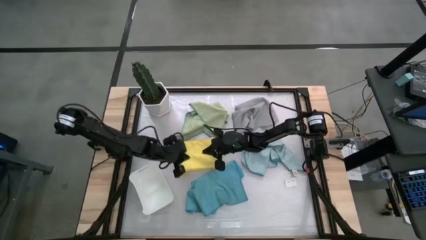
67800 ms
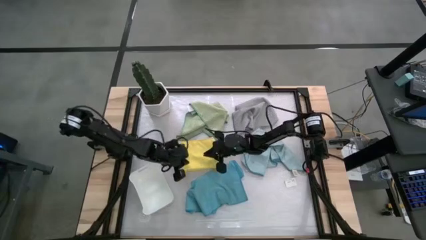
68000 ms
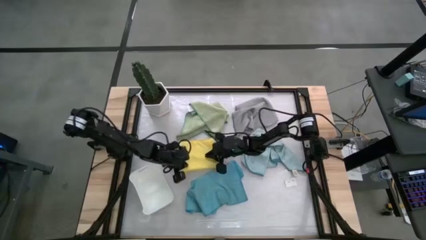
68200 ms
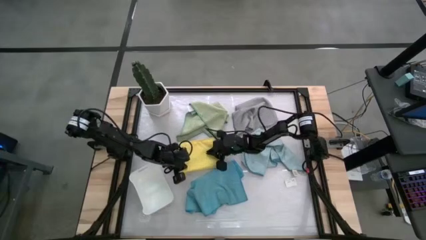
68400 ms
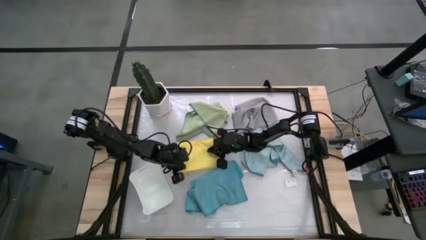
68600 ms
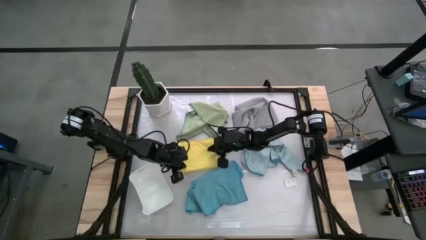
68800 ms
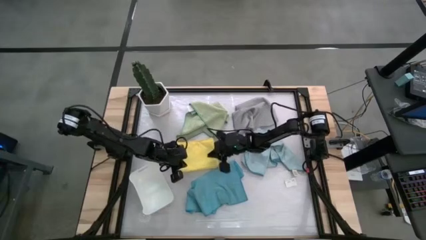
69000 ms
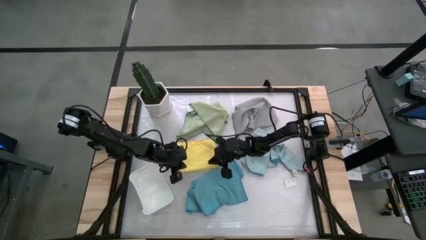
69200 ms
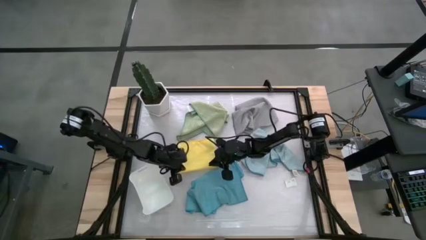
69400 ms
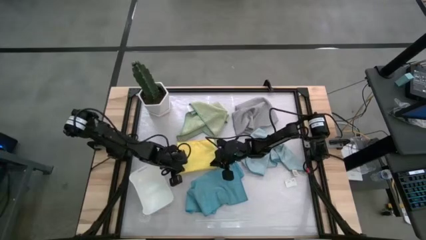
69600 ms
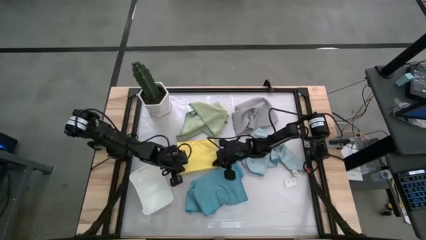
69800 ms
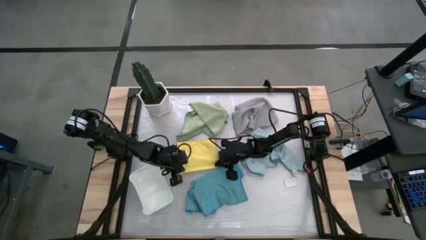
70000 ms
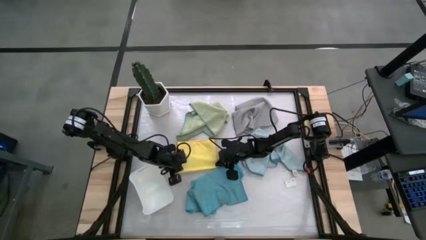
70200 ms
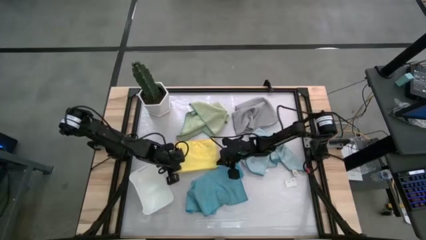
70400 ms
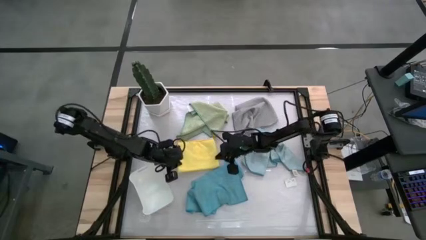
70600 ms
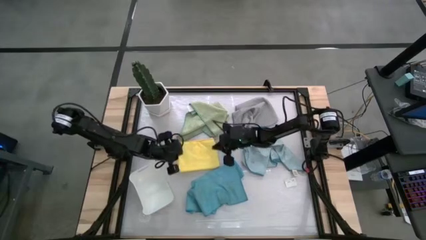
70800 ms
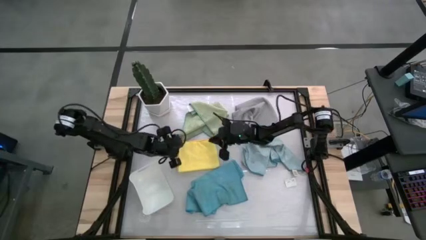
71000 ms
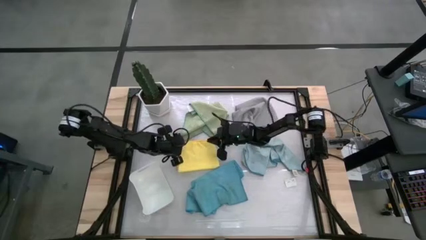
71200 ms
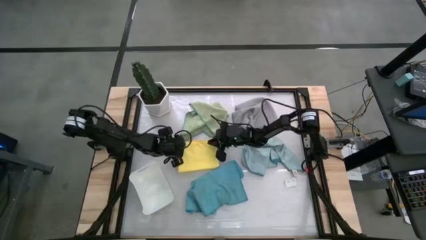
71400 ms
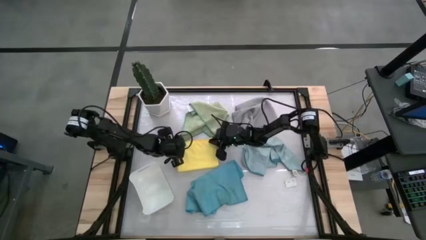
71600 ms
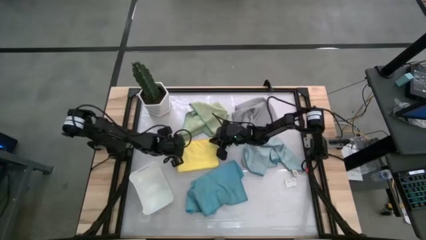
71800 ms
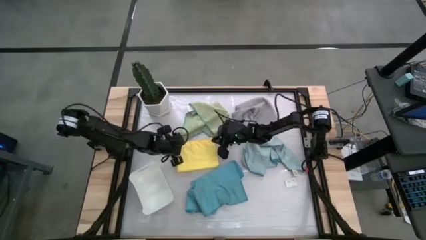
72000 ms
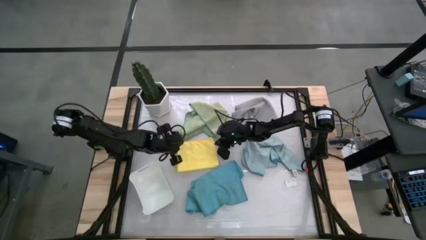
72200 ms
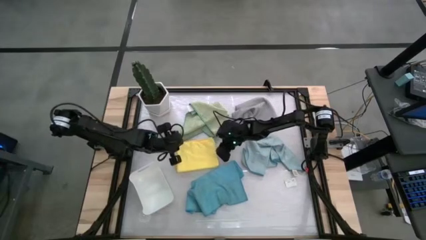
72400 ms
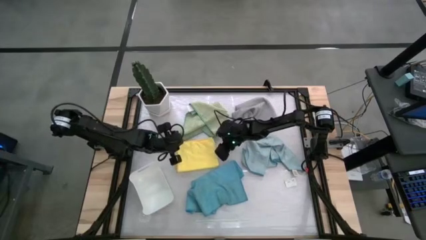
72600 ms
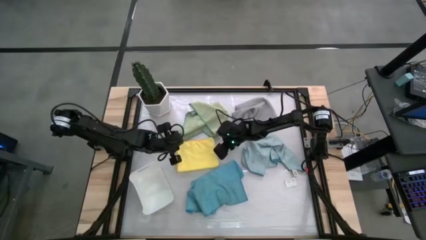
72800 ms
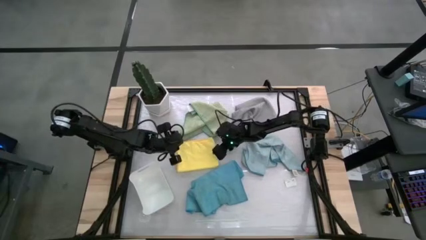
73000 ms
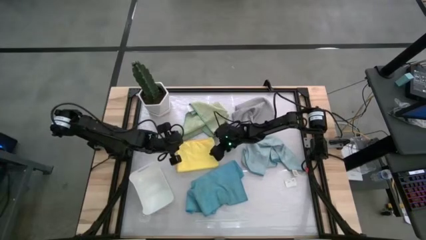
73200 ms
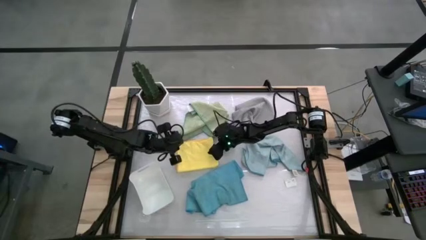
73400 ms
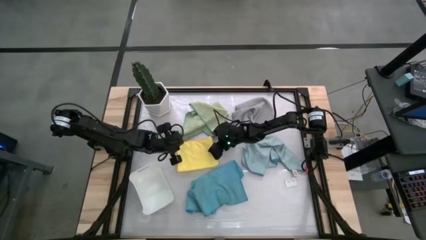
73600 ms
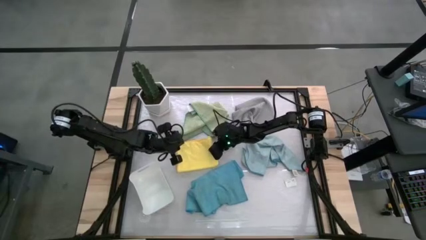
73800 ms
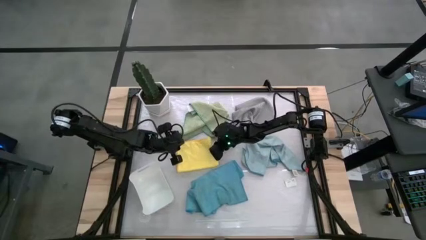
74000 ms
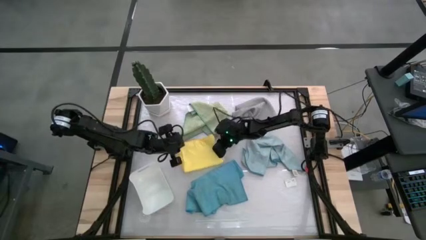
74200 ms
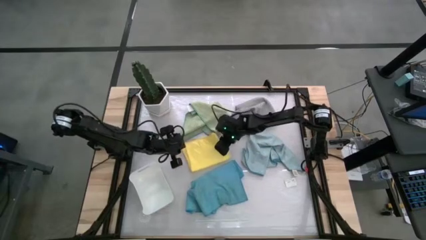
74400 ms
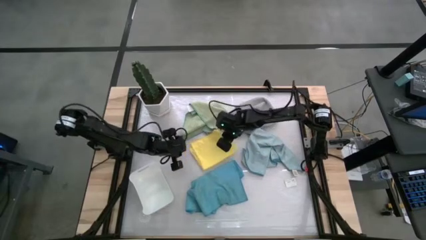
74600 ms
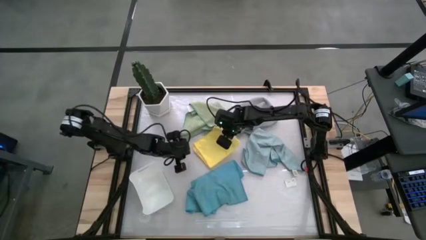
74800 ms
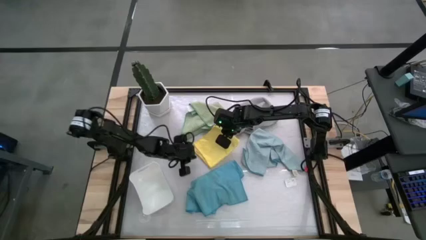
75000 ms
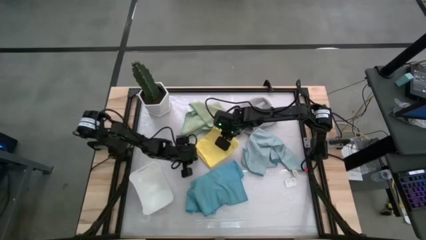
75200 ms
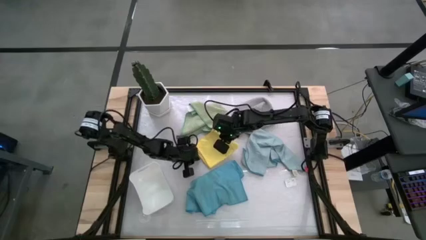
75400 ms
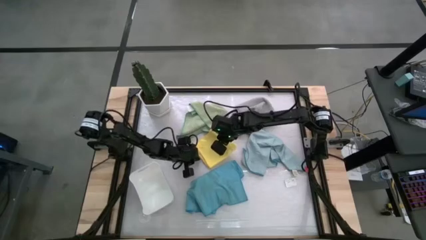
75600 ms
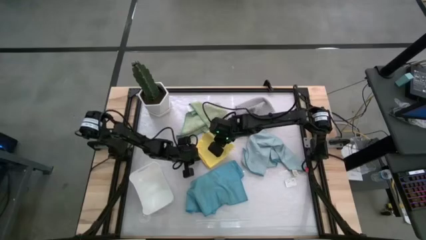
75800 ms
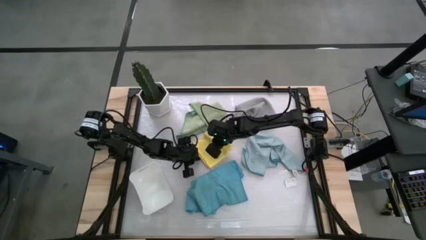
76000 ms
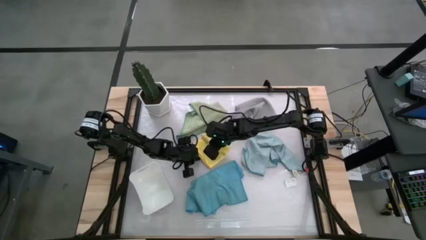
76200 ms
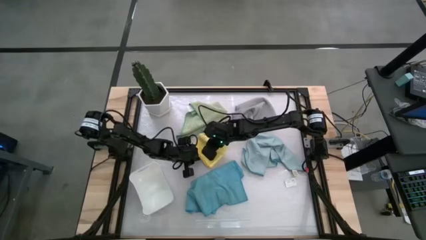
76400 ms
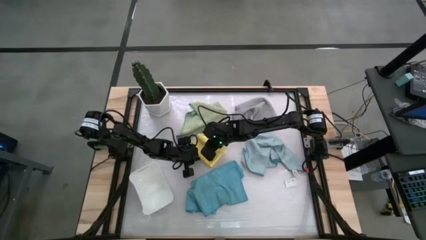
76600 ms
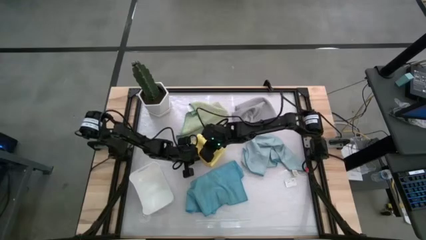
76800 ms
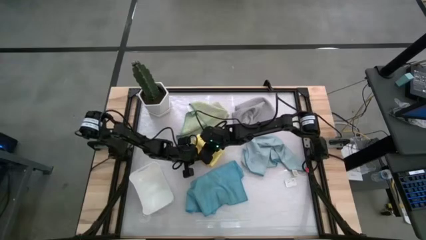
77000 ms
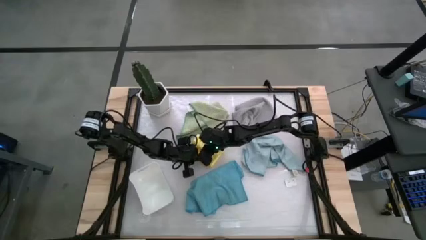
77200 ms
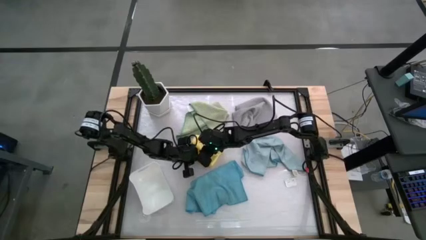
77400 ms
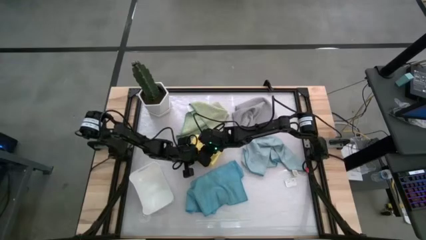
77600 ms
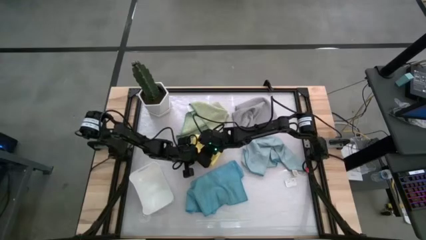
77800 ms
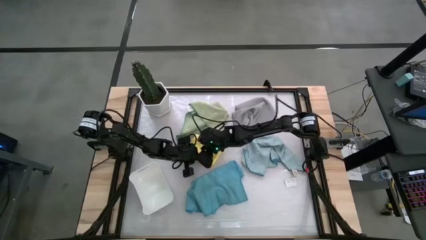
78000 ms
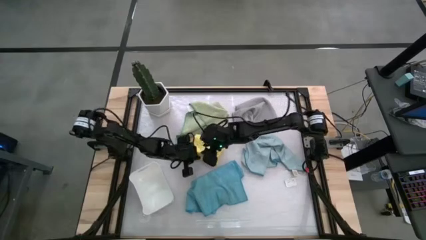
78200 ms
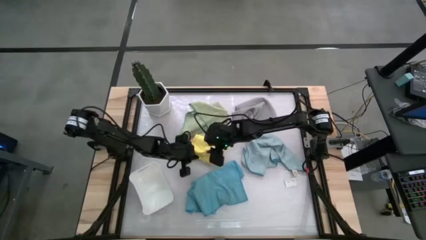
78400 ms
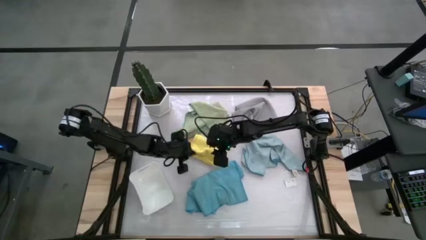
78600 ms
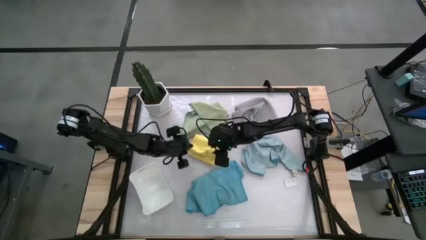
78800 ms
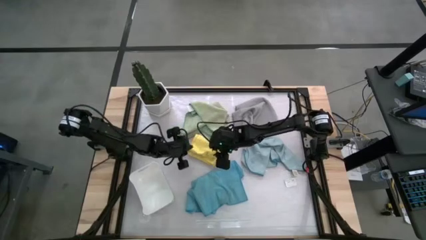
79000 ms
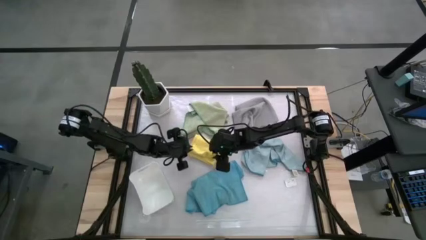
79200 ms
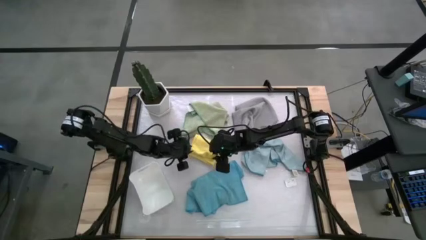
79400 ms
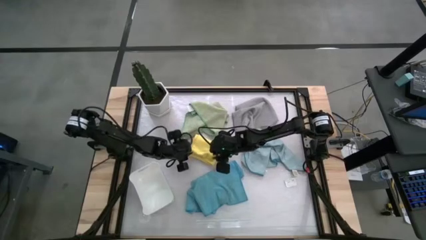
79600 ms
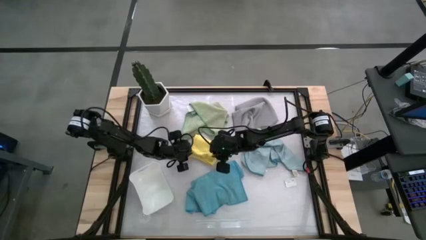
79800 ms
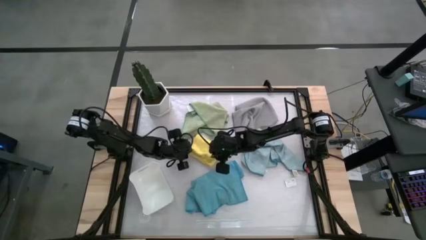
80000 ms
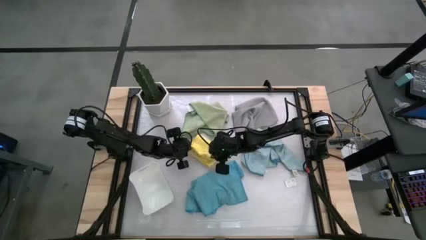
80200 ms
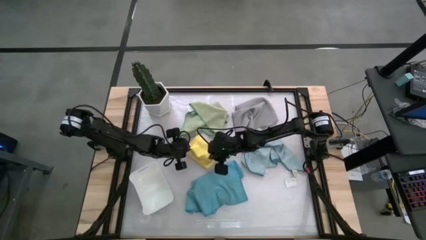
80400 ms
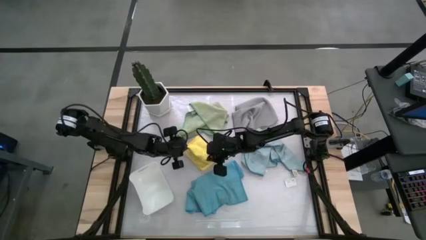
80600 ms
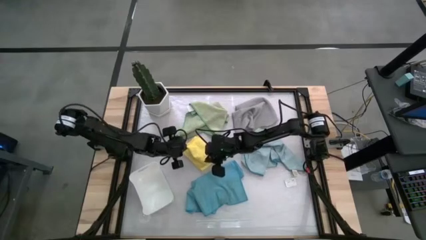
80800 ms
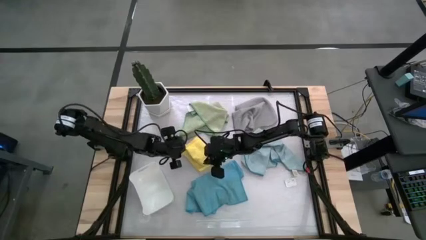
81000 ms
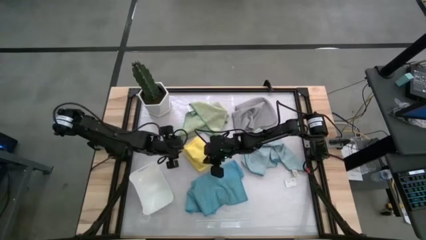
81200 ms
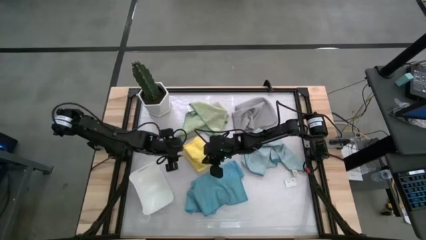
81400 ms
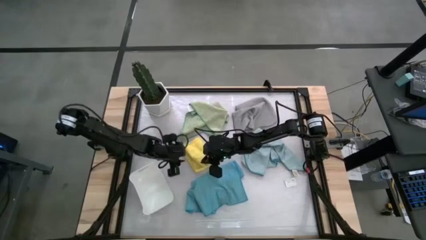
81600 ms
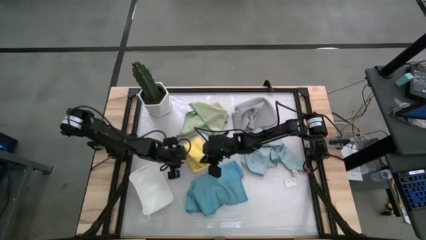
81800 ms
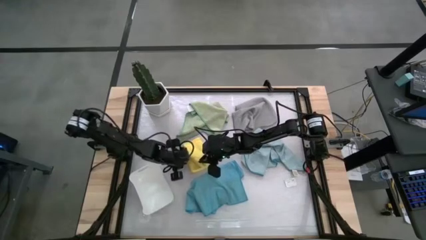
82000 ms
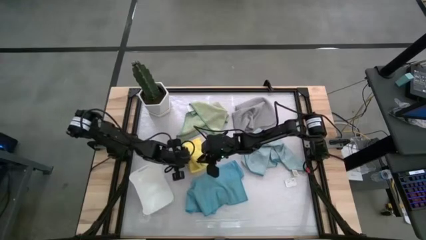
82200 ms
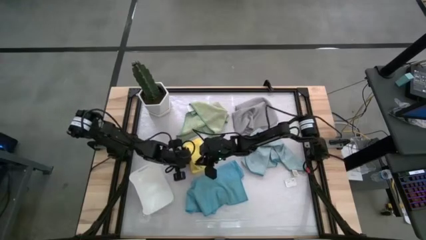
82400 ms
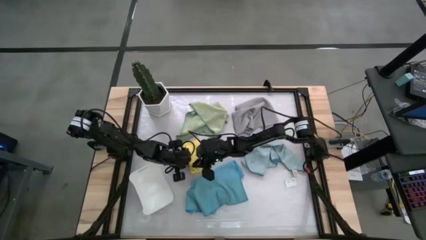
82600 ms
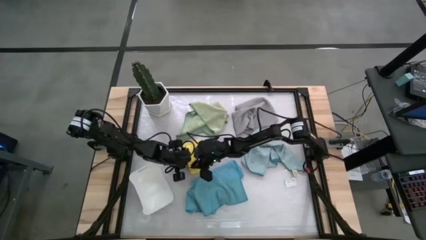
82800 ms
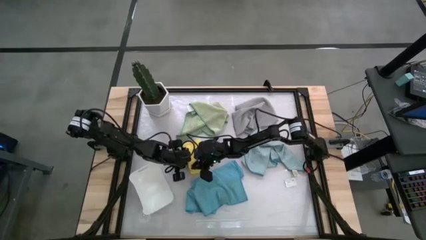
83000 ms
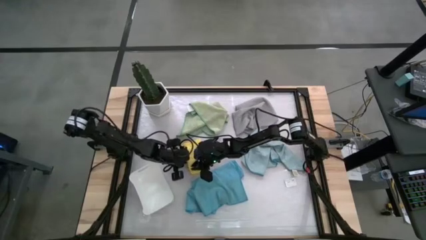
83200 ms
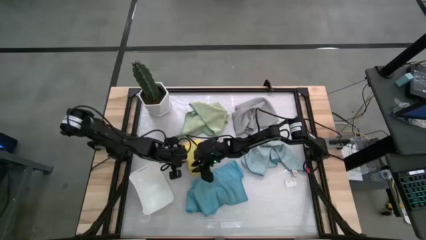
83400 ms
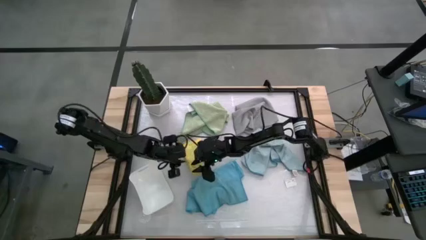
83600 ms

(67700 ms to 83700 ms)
Task: Fold microfiber towels
Fold the yellow microfiber towel
